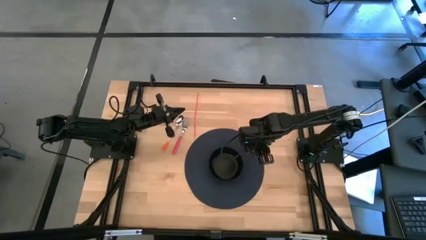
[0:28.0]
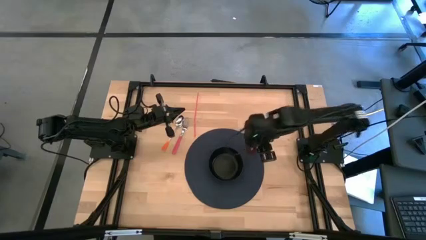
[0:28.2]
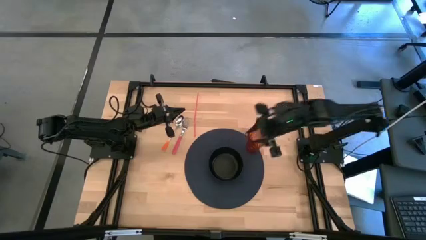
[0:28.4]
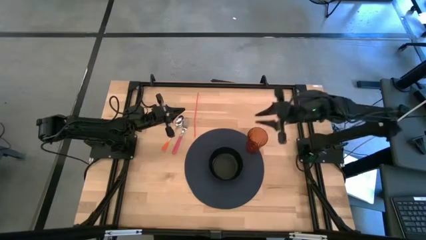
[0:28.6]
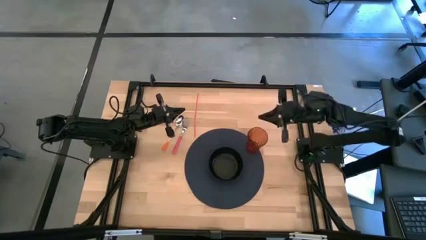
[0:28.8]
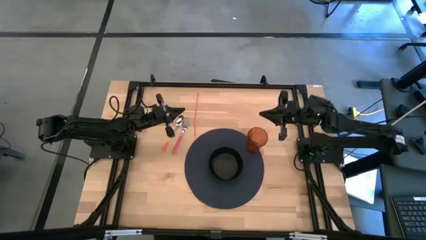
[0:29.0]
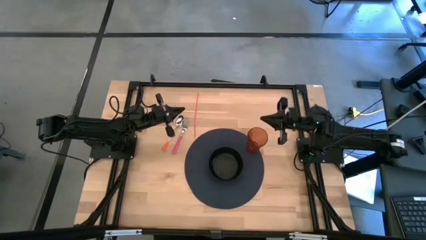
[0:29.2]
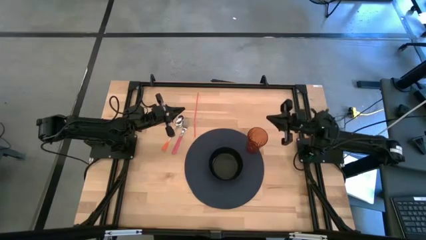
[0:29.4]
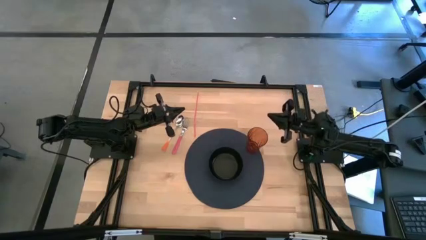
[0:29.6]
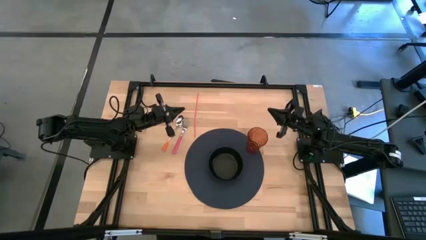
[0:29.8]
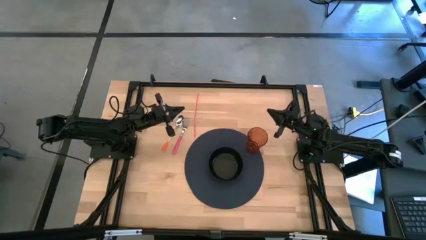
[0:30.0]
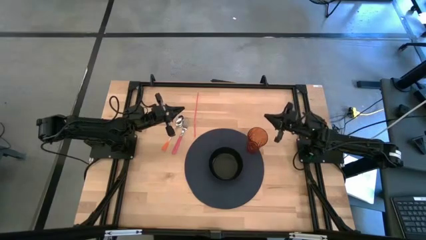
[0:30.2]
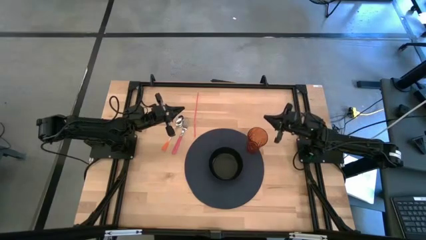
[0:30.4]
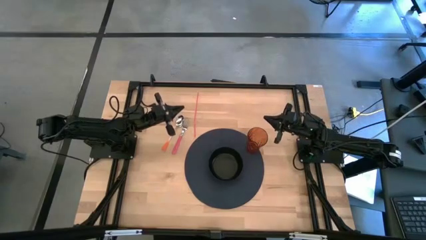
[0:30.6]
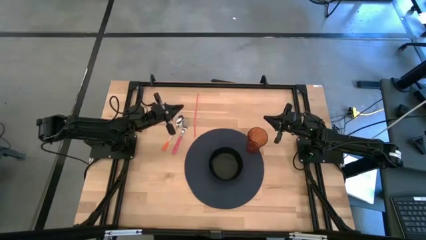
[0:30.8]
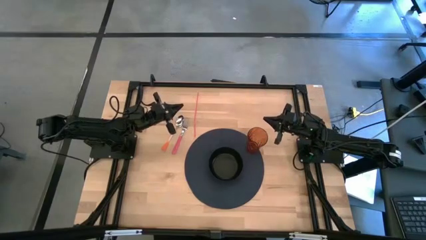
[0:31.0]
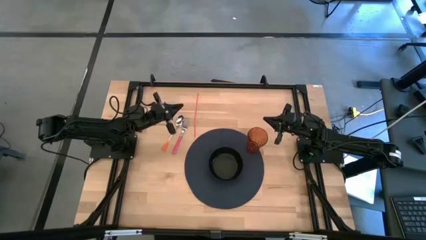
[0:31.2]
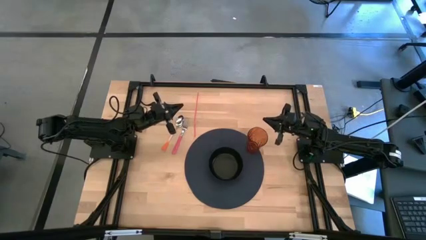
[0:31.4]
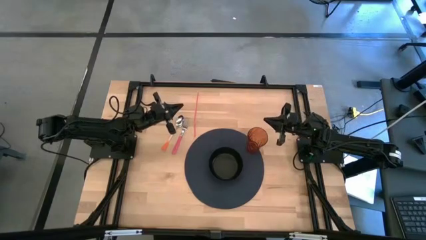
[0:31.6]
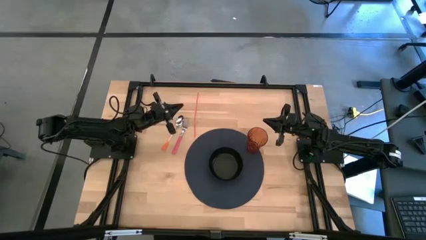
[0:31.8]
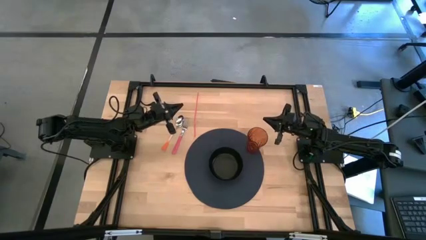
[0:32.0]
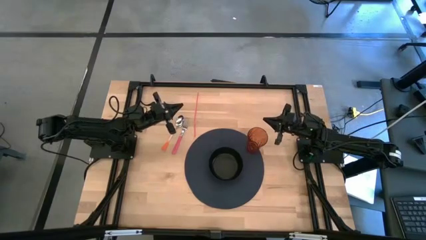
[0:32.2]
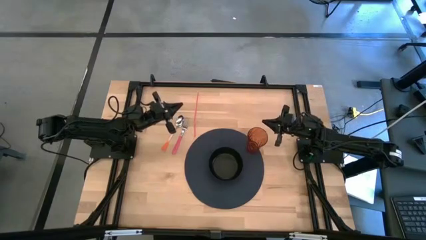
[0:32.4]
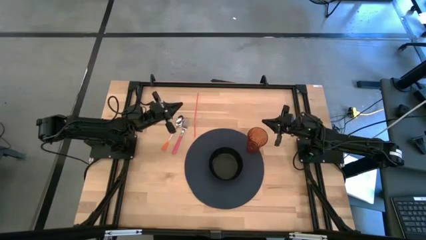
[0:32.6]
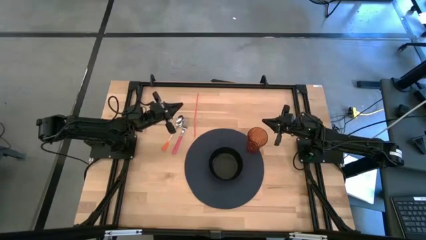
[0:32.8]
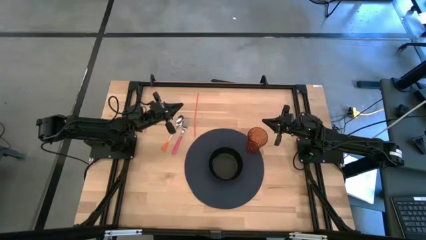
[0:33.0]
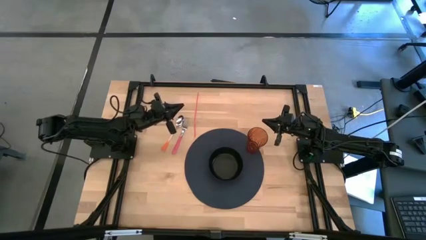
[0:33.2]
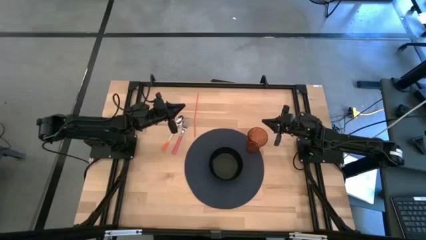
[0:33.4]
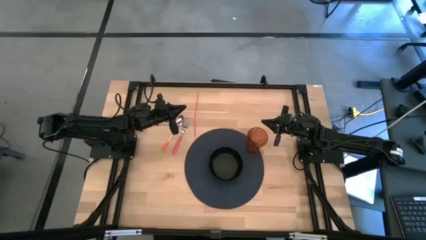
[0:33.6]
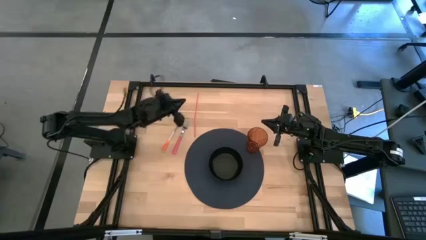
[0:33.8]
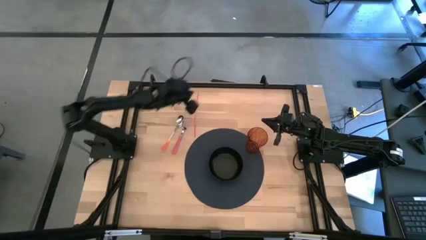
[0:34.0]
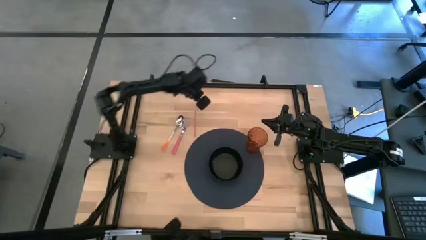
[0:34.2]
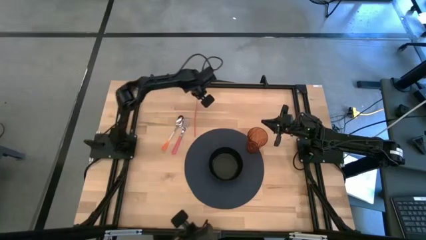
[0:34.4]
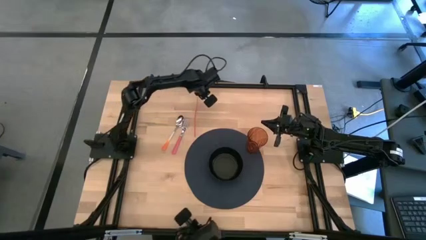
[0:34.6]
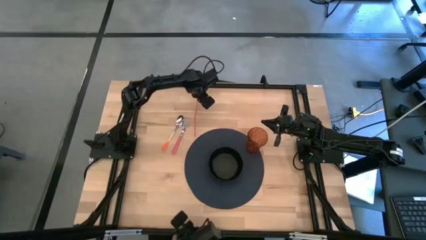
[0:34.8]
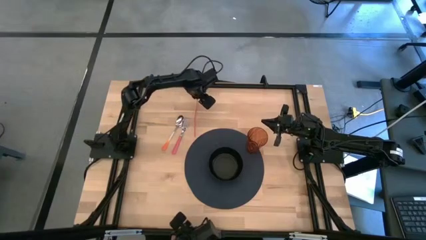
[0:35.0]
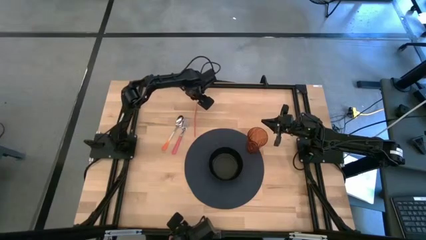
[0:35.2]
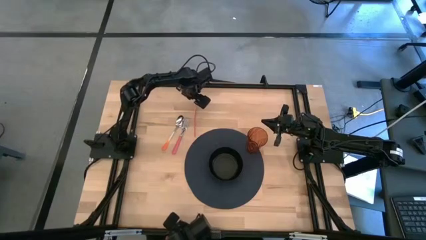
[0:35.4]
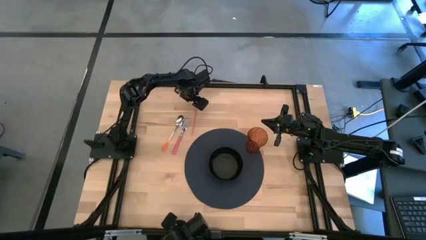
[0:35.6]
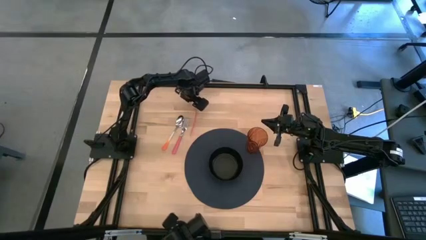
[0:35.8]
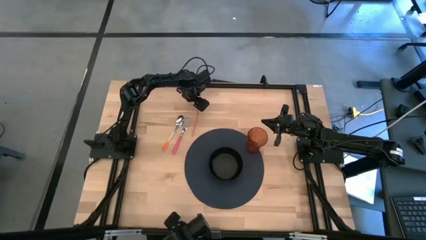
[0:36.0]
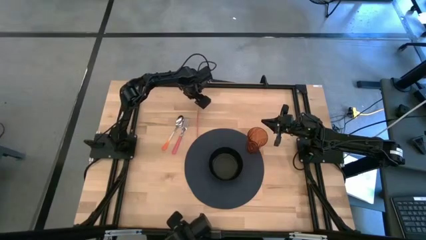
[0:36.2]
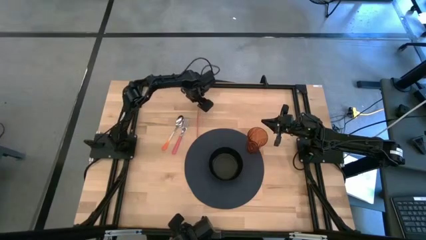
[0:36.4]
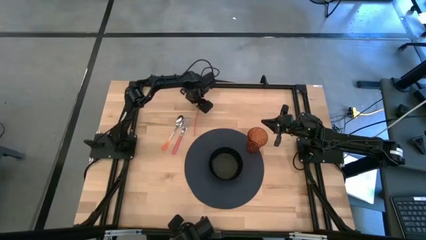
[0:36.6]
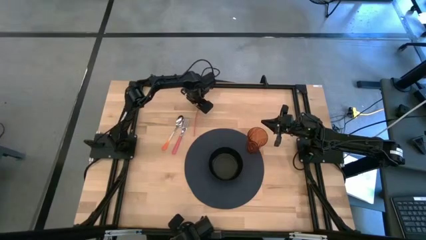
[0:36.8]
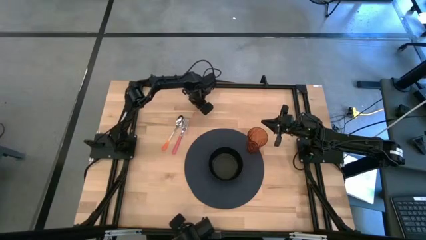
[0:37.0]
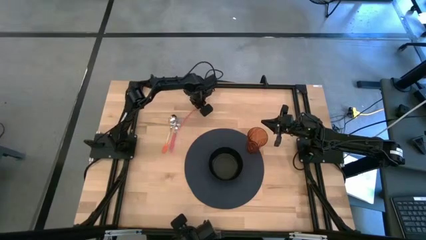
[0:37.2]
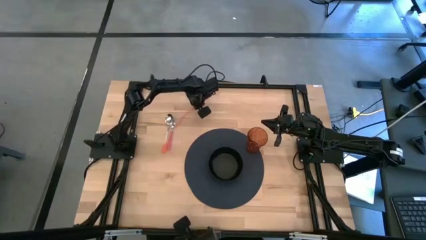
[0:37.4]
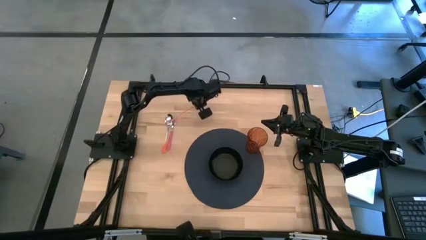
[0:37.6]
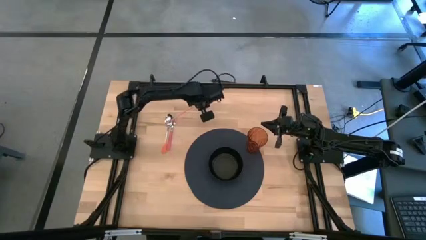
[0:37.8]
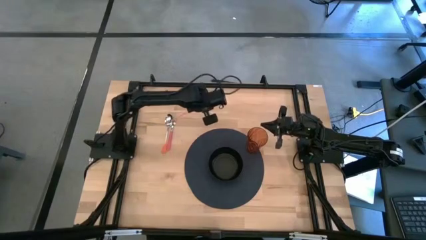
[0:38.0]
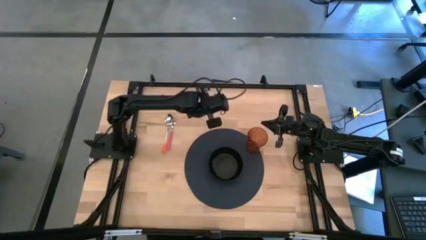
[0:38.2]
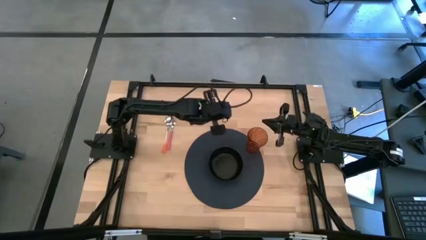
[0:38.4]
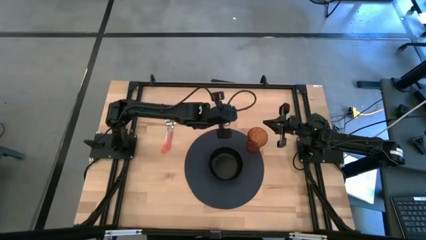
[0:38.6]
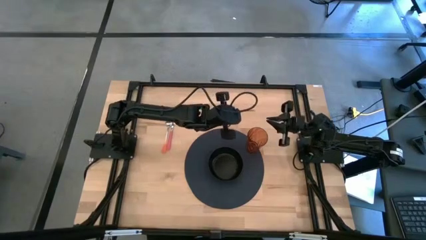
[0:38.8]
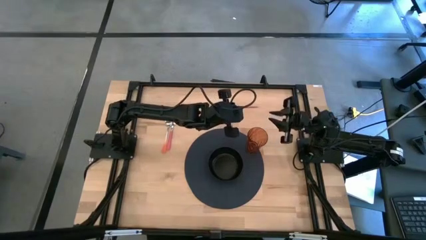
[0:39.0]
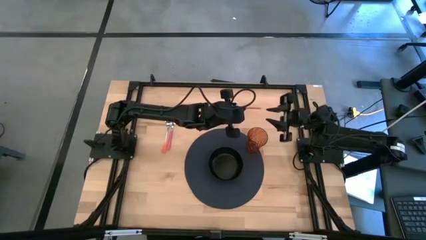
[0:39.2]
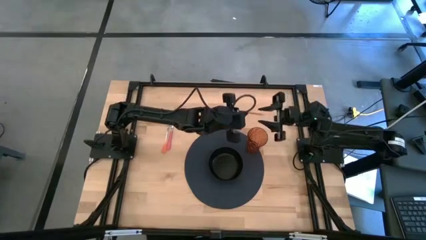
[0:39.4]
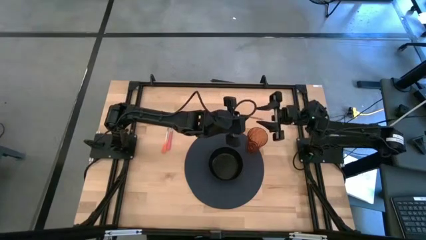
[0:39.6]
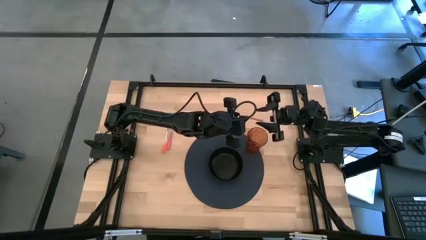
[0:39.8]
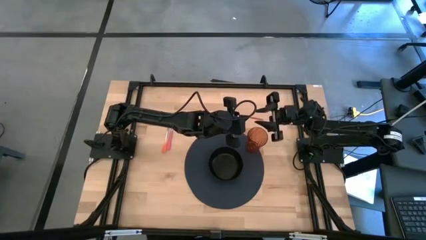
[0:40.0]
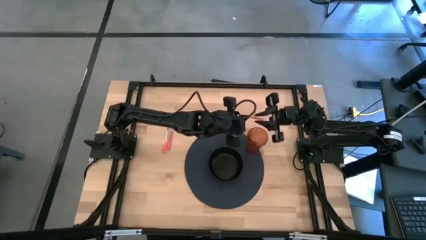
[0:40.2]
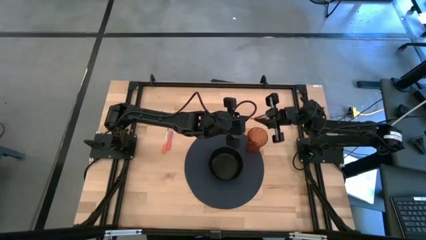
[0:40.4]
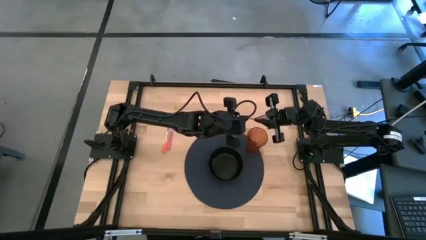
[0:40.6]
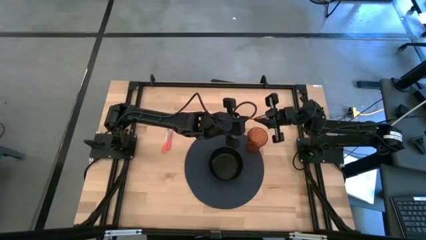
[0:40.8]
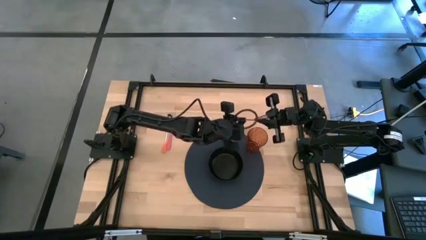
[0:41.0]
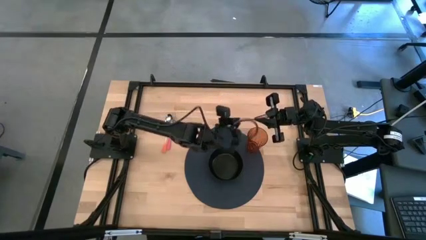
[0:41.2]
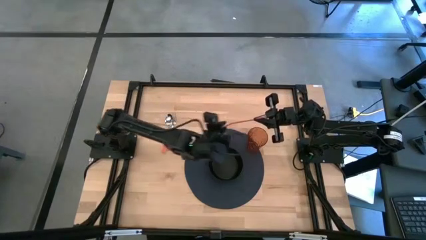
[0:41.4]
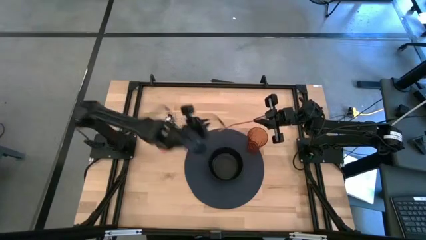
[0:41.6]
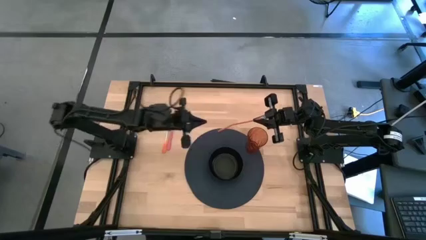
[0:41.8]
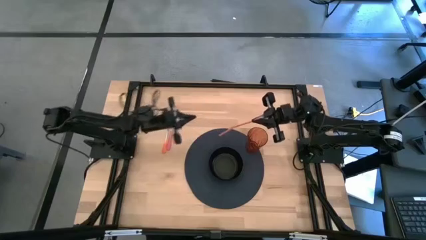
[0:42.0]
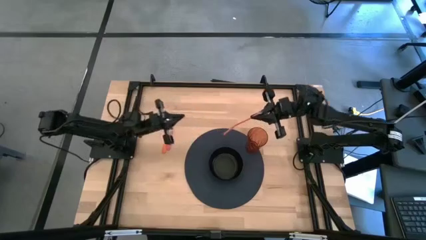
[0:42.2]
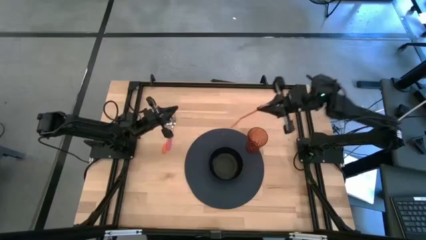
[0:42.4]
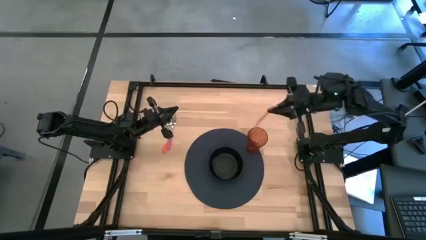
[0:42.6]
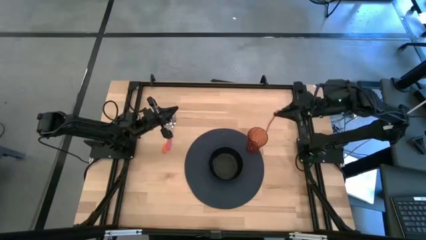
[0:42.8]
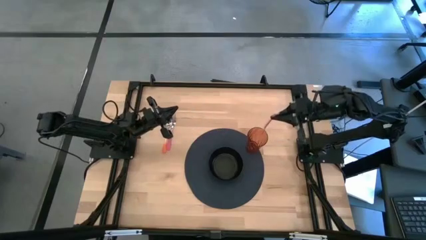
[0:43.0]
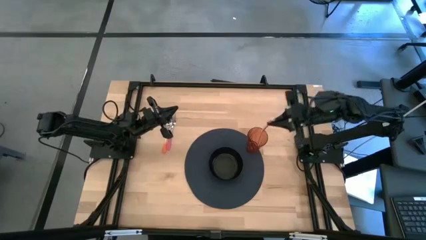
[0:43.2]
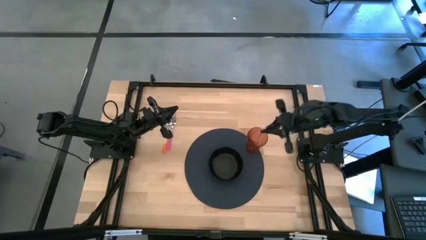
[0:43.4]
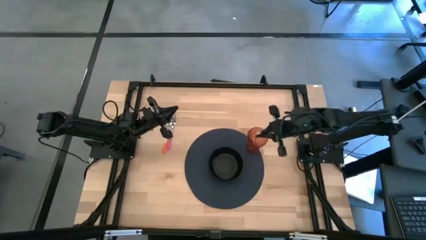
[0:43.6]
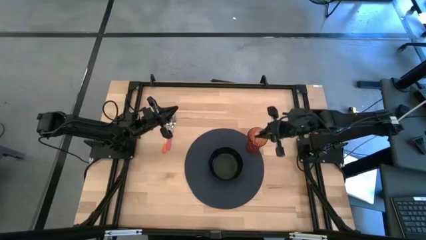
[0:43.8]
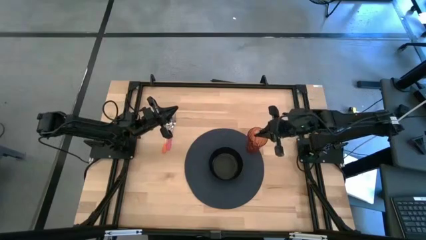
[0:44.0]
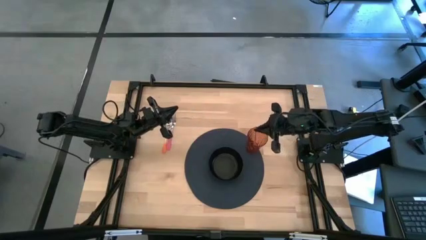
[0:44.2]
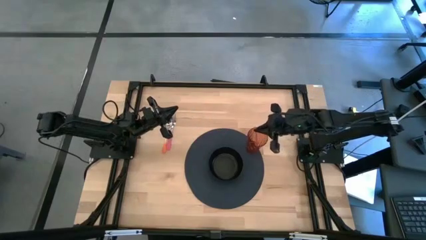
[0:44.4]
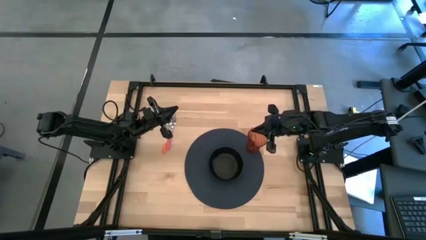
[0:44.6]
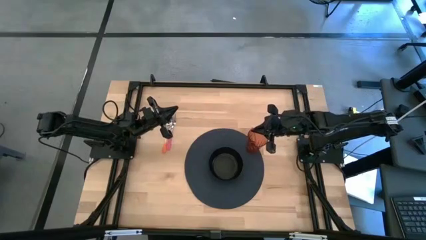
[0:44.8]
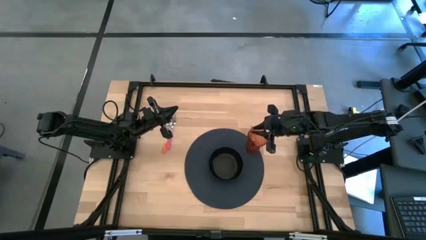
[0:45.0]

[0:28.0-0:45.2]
Task: Pick & Place Utensil
Put the orange straw into the orange cup on the blue mat
